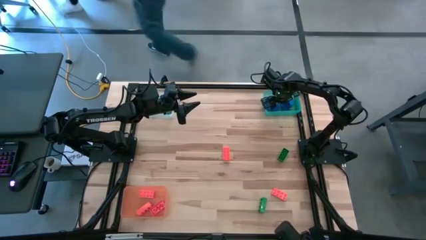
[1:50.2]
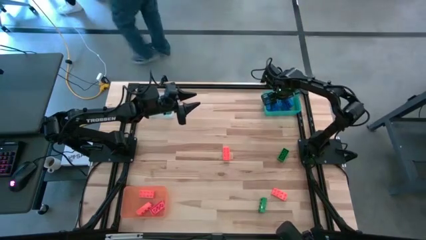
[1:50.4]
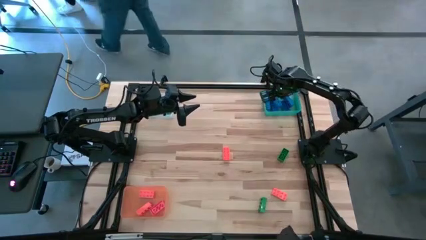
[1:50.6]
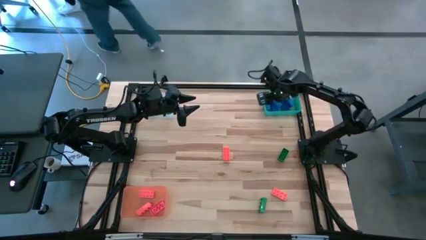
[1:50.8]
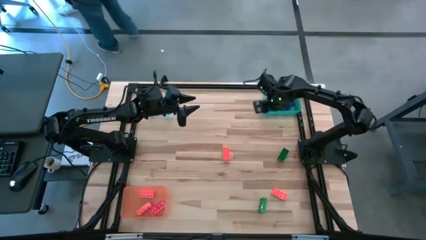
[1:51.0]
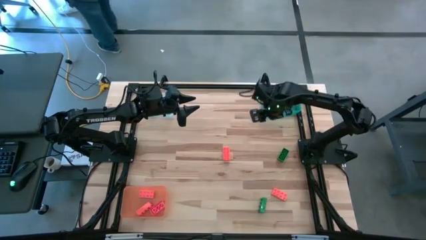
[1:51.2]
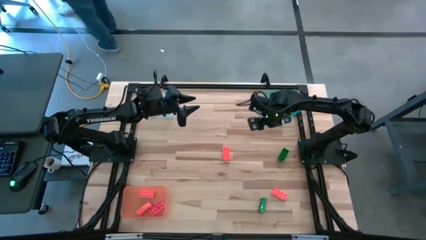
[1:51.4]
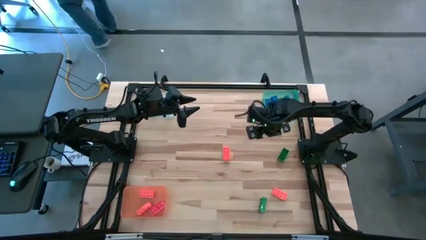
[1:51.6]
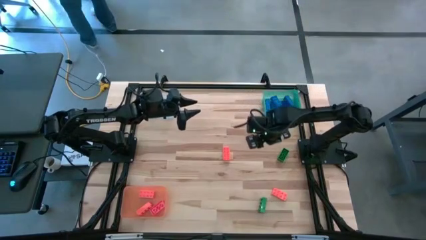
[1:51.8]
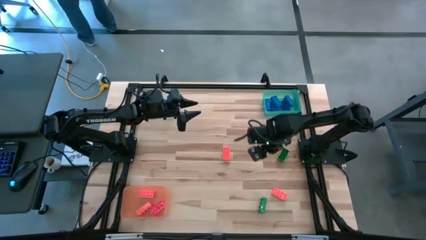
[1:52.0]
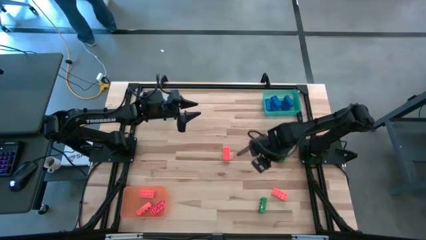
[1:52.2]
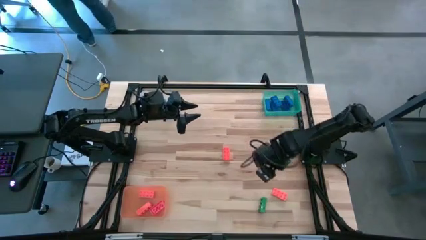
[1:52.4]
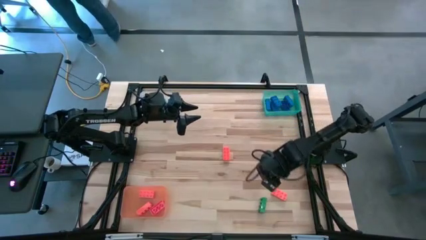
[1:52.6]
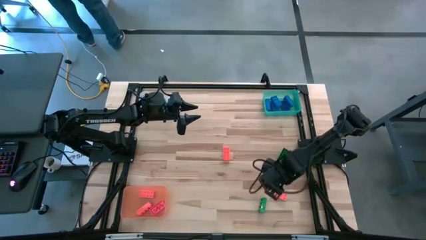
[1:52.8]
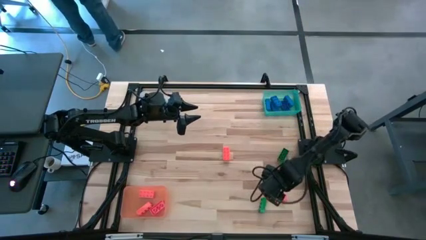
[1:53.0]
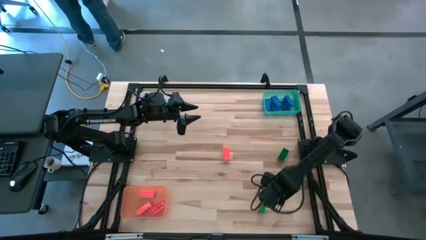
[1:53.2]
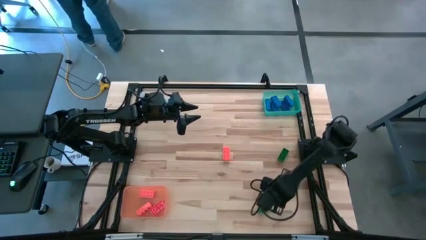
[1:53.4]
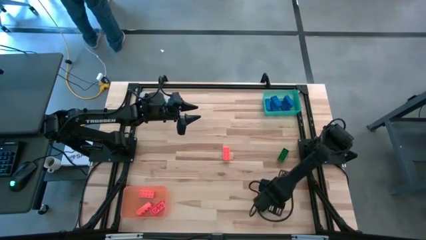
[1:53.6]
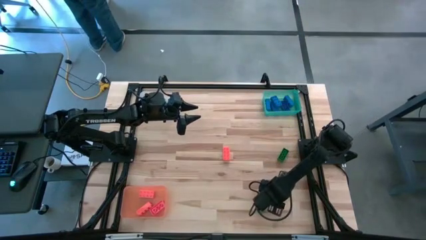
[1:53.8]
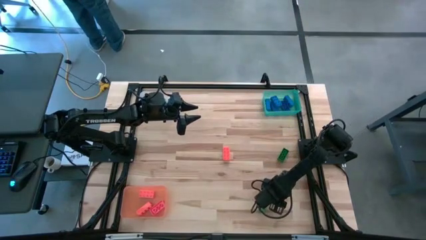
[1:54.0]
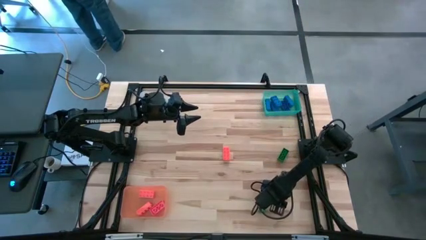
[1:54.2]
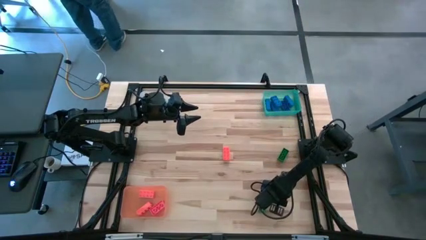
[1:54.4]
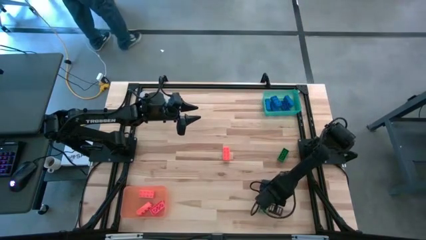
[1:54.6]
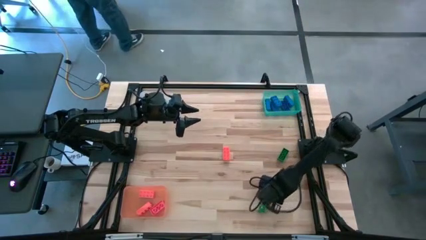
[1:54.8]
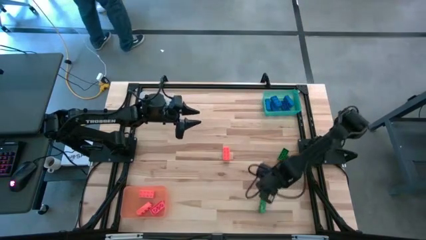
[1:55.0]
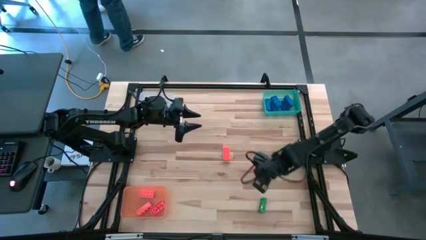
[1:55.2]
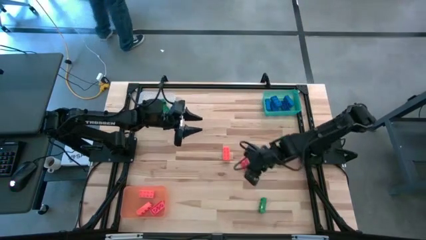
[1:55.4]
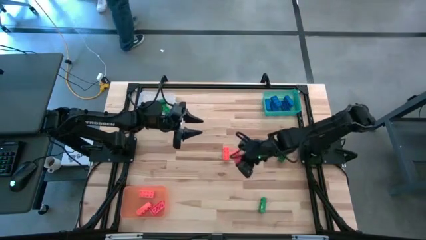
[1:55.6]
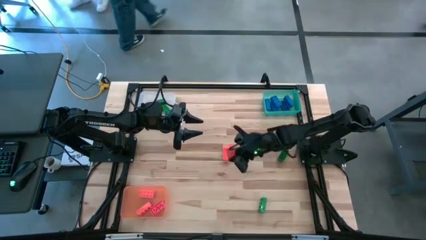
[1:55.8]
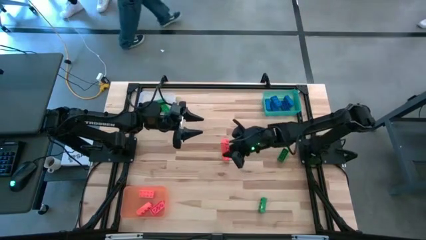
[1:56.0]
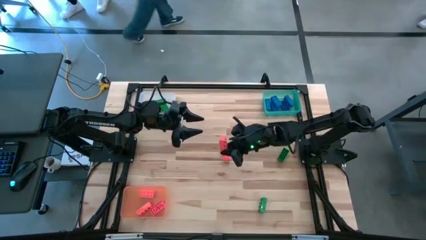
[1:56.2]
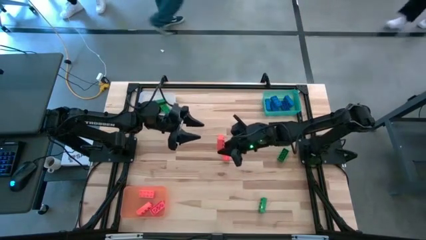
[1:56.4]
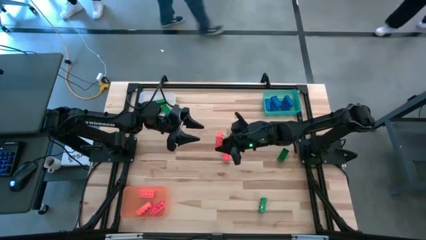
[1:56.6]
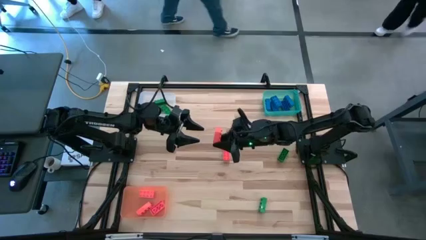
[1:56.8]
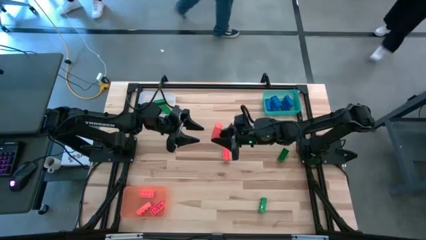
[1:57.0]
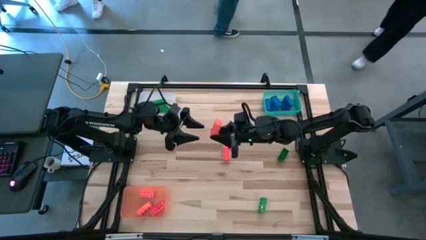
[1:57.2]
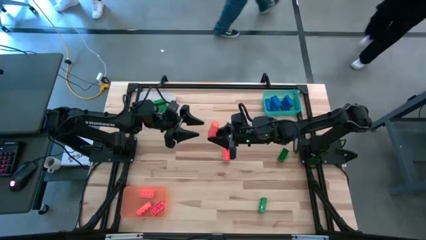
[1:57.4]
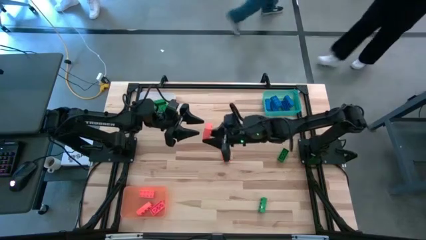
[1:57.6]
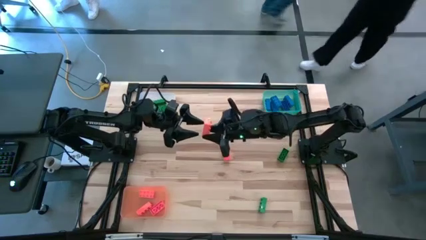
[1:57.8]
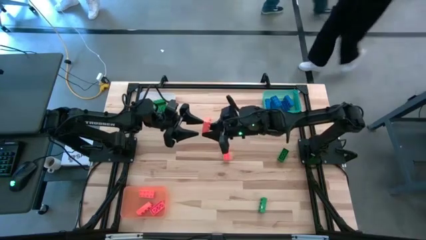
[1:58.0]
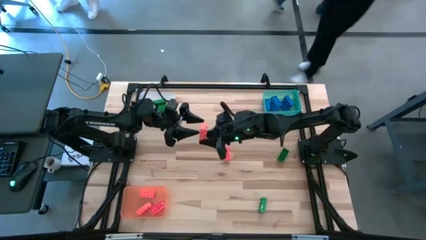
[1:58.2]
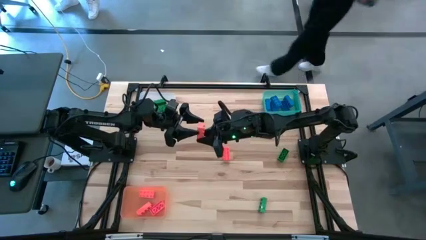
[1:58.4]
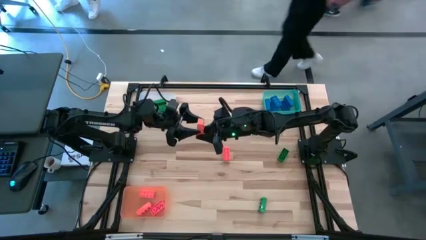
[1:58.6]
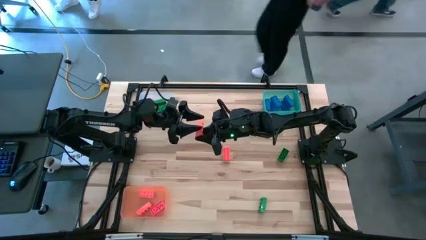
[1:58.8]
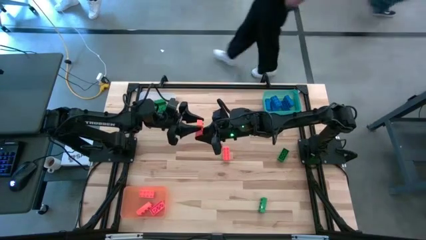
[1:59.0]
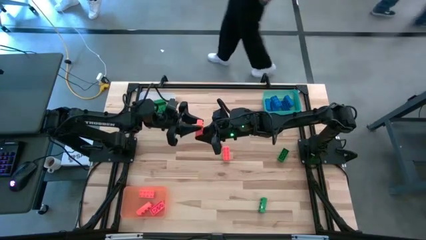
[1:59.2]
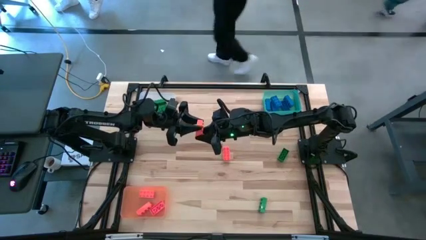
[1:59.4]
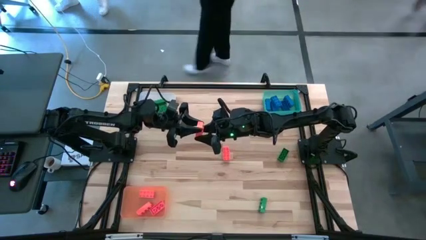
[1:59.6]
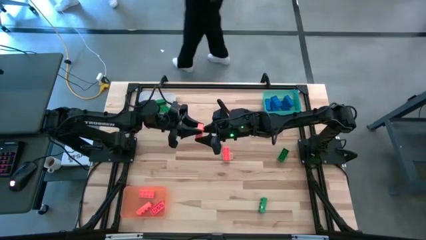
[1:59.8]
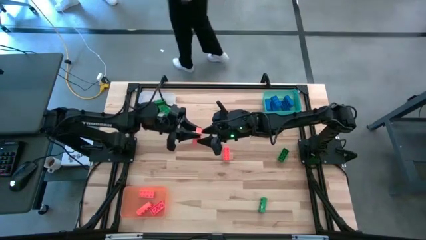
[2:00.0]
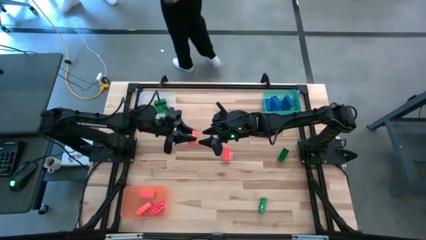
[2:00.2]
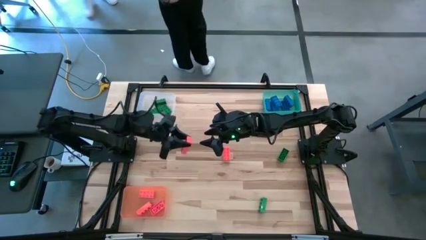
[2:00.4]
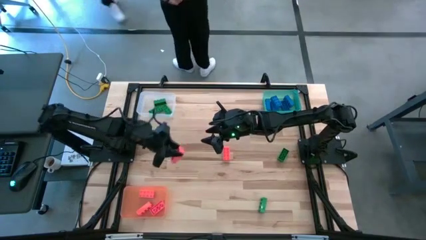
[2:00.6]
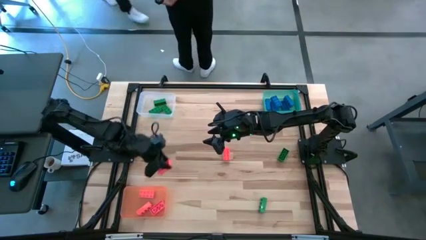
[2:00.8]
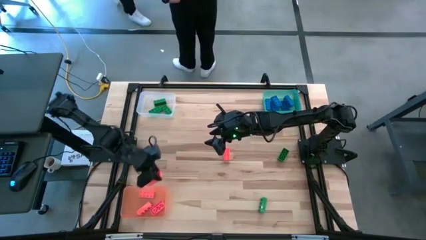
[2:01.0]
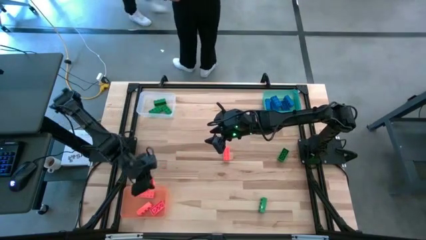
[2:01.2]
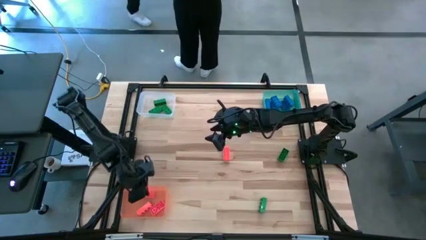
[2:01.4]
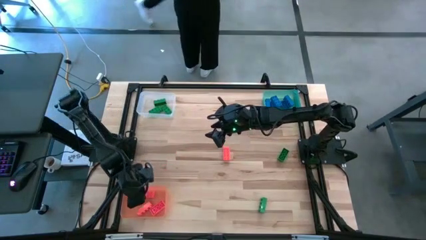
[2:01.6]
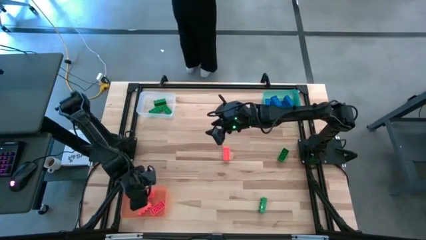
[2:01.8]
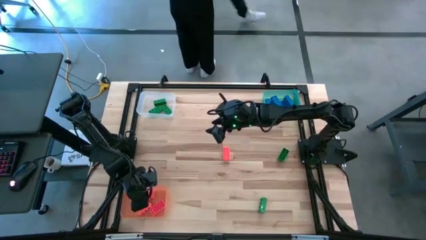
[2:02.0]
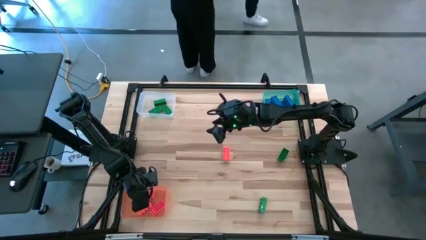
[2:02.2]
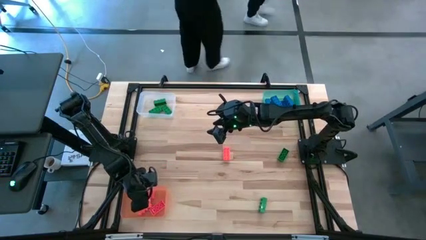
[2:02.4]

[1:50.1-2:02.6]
Task: Sort & place blocks by color
Put the orange game piece into the orange bin
